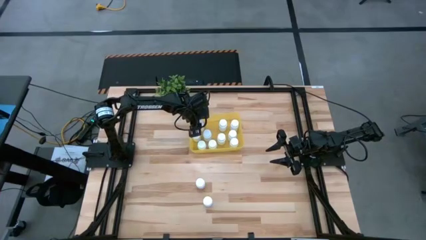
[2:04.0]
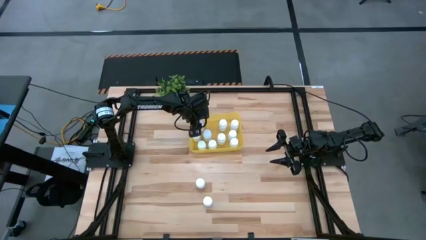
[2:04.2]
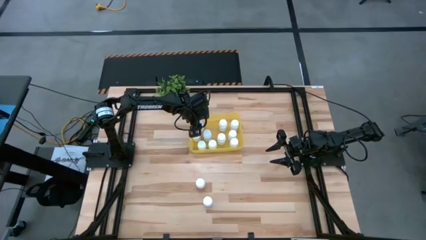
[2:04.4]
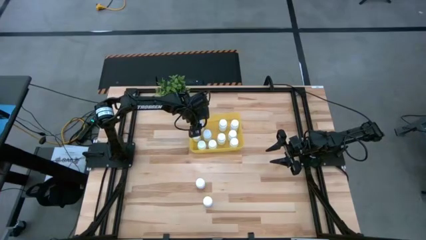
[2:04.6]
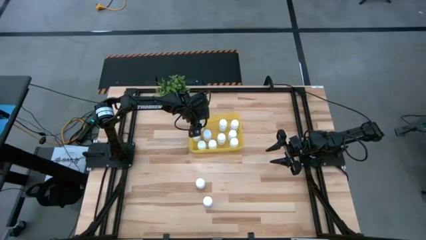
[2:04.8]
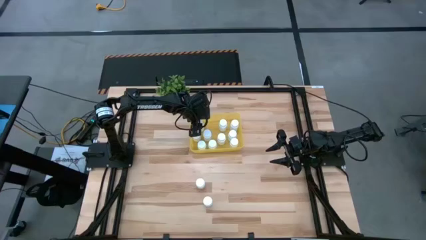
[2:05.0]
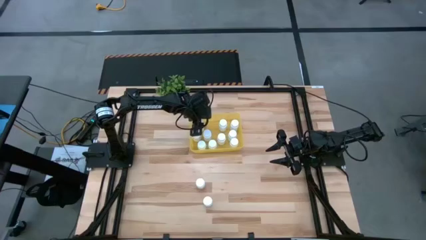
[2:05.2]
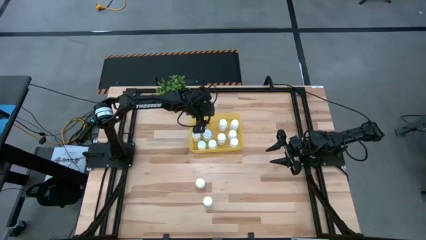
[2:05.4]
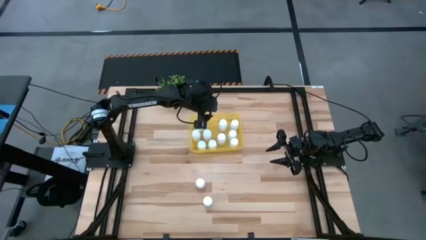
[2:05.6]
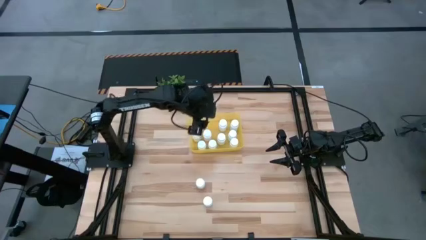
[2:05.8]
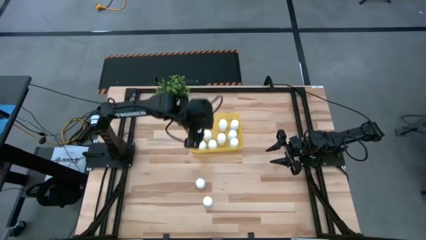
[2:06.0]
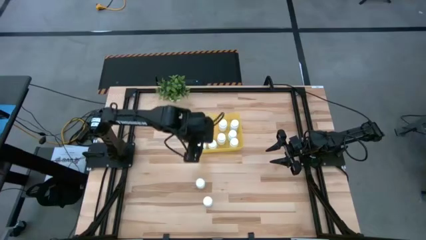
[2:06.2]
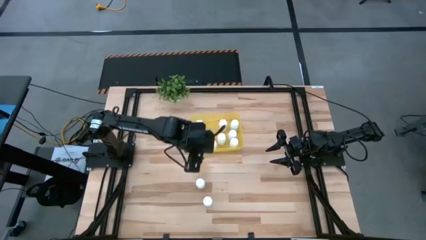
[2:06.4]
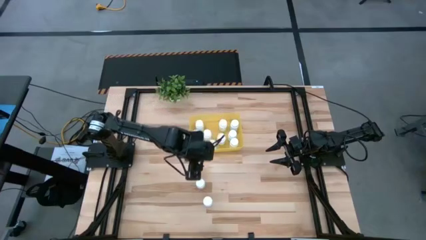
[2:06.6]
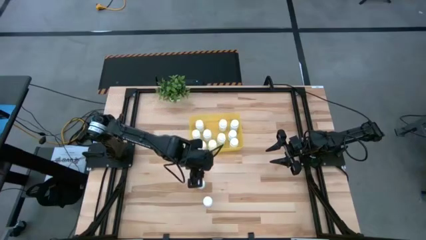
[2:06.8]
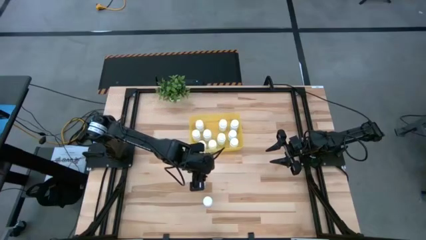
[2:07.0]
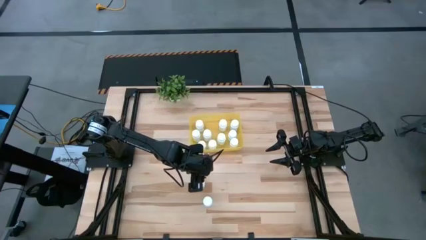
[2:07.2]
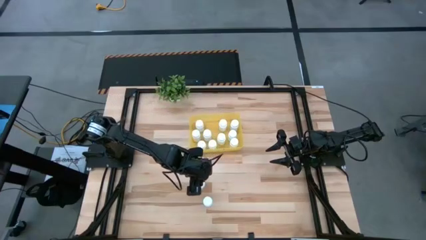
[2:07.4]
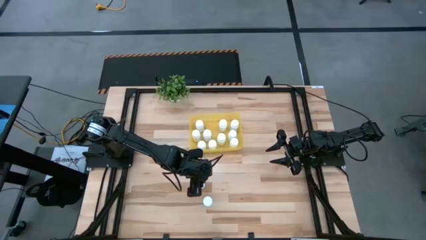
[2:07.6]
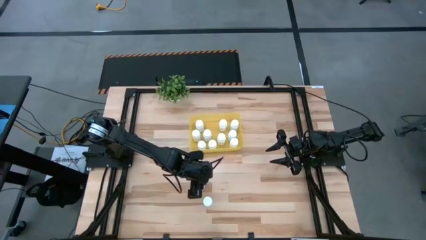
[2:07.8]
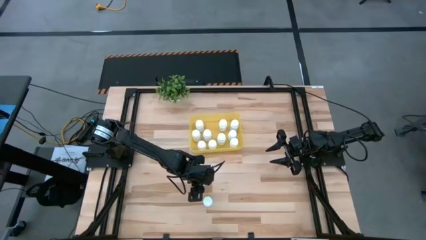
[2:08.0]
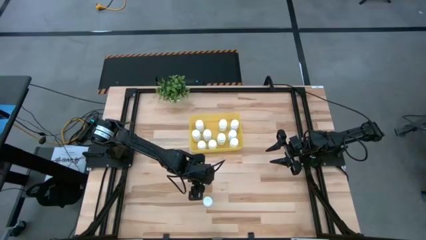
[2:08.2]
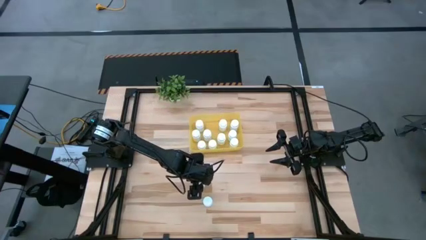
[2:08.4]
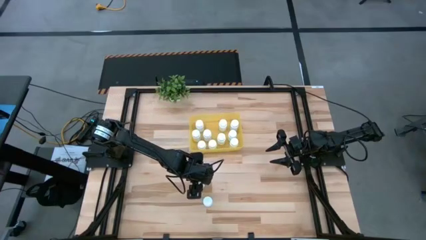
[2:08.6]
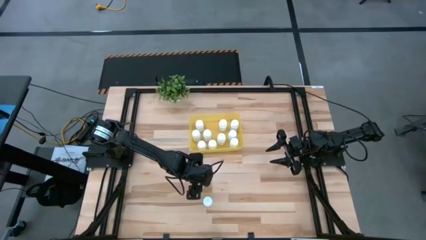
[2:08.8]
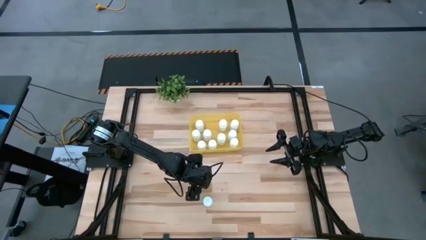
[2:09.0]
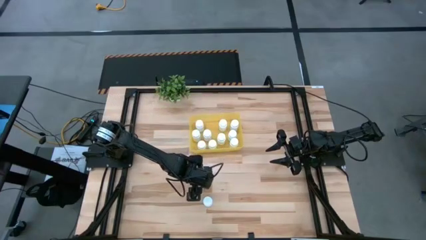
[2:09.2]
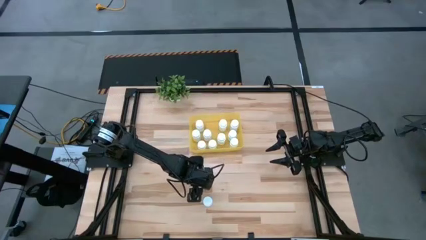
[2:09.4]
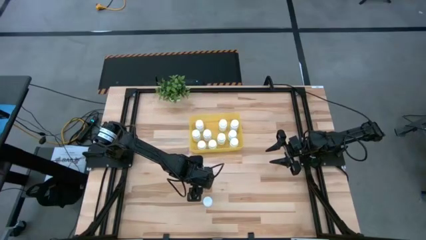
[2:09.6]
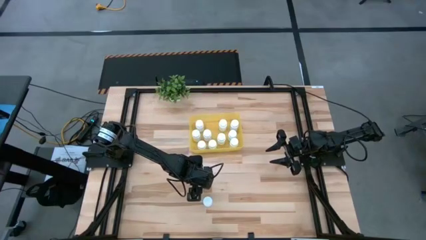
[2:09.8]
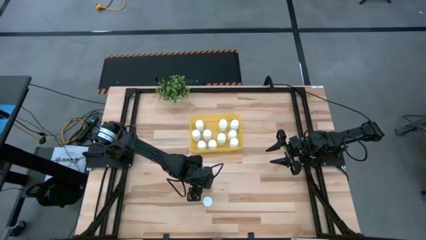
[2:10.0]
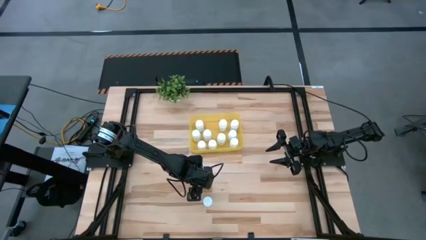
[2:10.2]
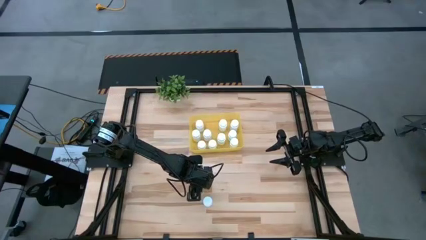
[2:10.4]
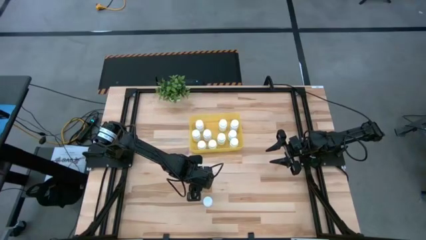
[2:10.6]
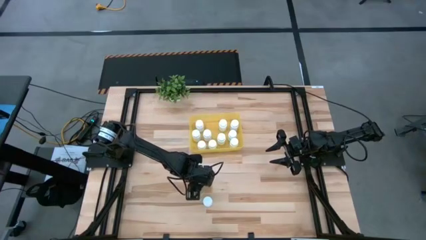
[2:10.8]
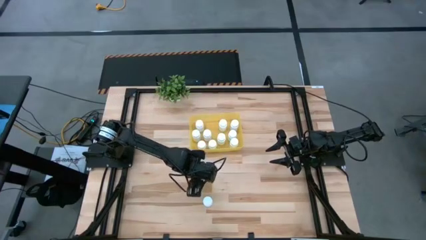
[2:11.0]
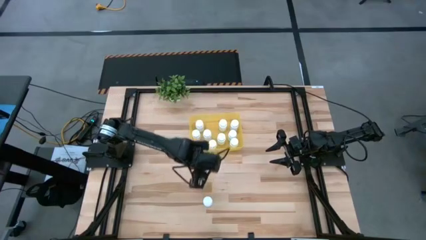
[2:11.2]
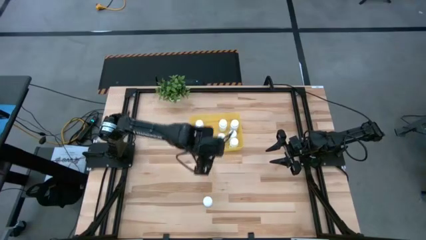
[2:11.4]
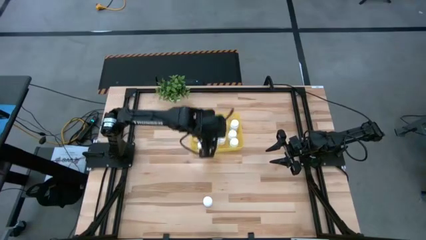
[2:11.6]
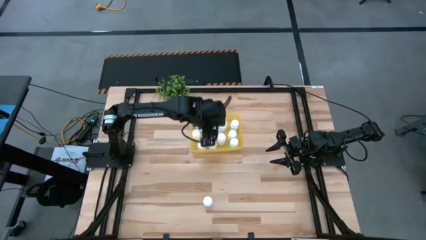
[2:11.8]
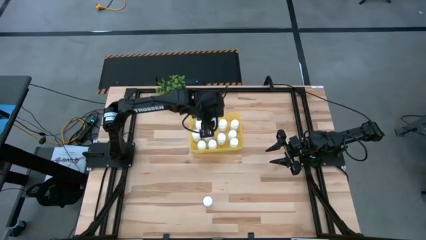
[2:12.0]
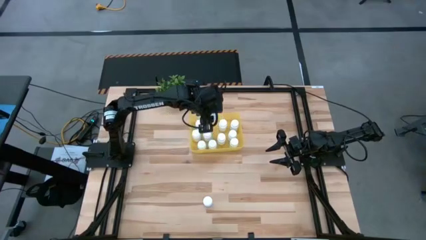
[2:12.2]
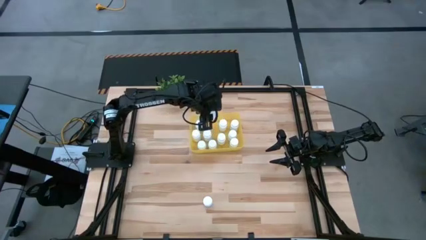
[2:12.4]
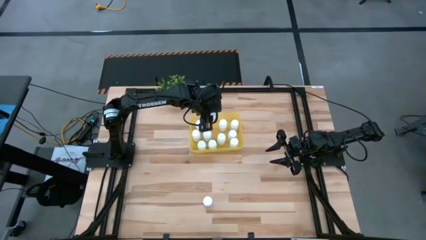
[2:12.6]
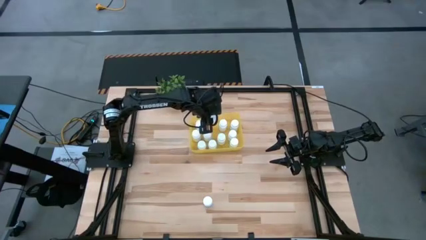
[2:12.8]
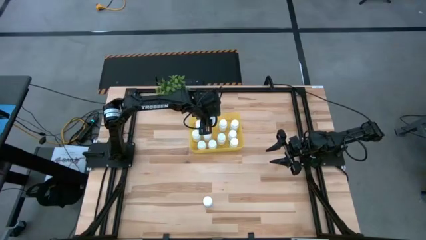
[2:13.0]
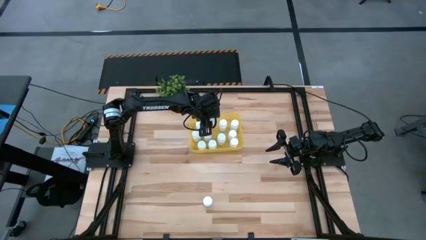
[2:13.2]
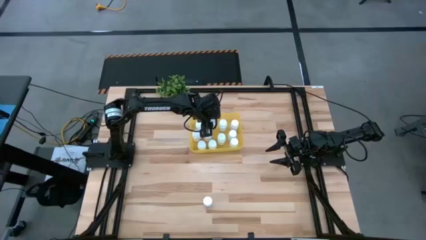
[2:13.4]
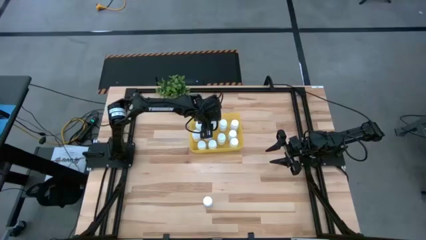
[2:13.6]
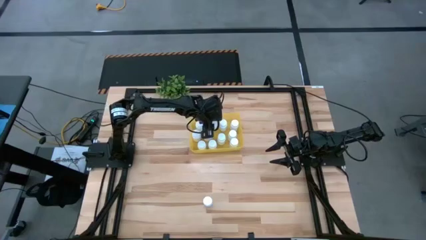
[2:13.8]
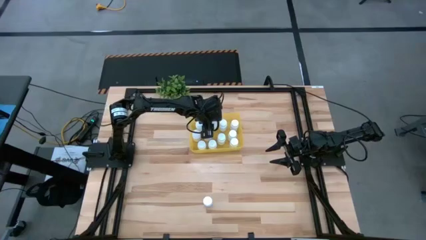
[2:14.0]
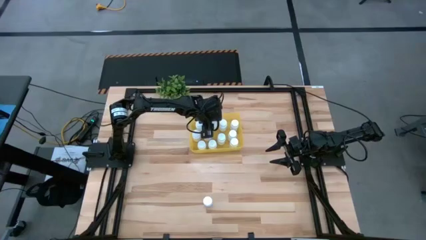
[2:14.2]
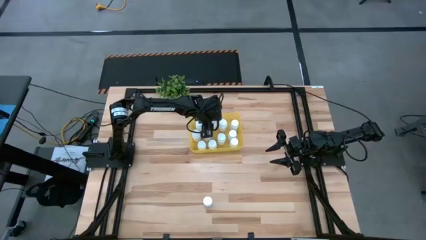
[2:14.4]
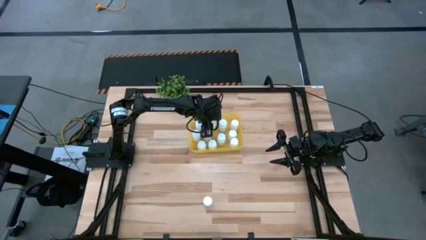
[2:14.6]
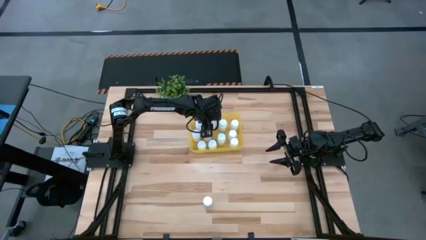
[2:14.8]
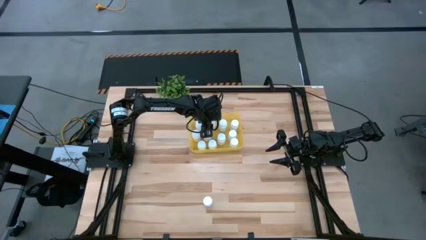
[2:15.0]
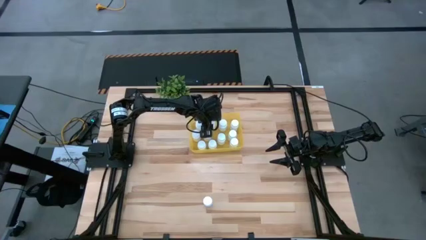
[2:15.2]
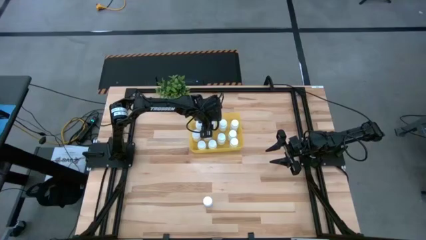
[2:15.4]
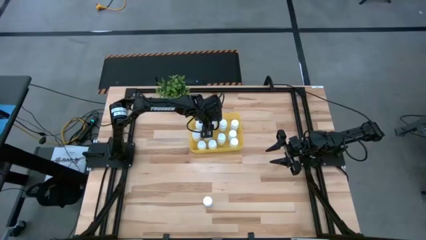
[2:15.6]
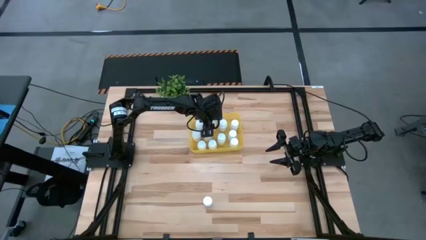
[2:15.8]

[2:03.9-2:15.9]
Task: Pick and place pill bottles into a basket
Put the white medicine bottle into the yellow bin
